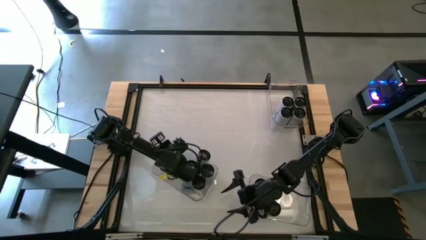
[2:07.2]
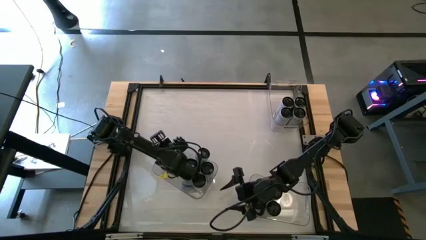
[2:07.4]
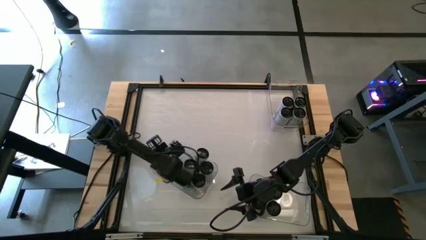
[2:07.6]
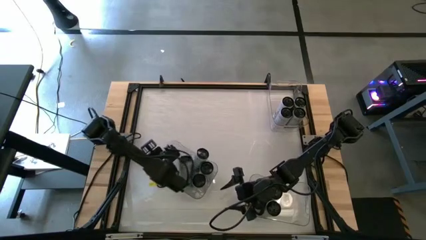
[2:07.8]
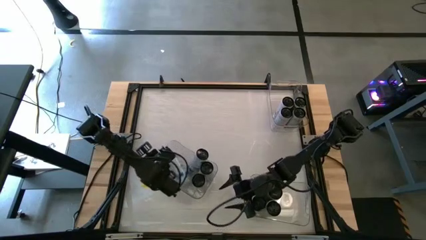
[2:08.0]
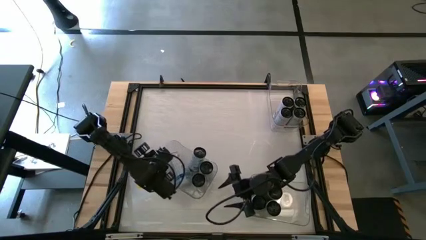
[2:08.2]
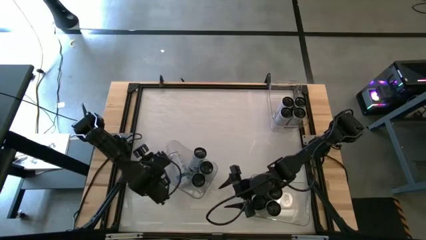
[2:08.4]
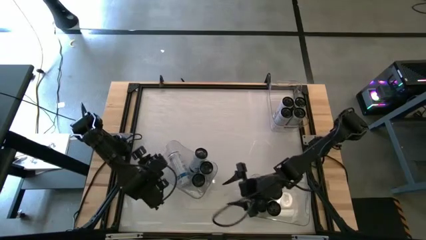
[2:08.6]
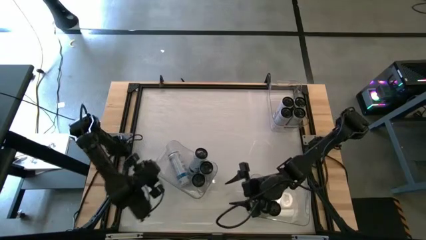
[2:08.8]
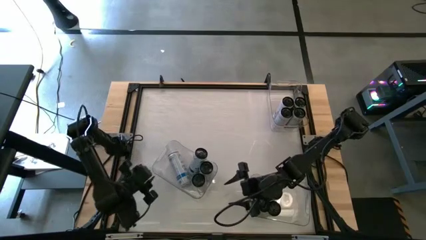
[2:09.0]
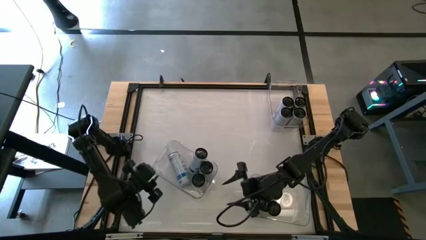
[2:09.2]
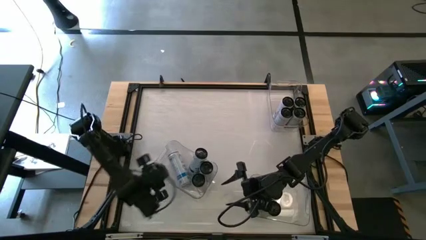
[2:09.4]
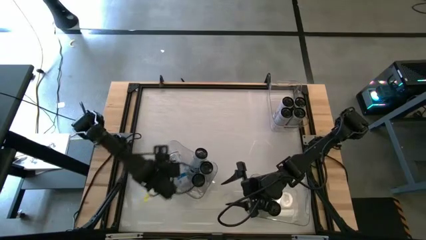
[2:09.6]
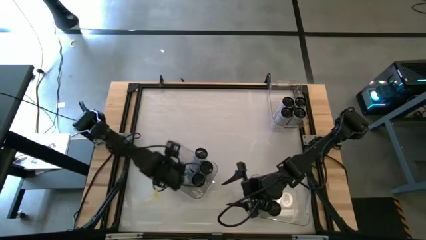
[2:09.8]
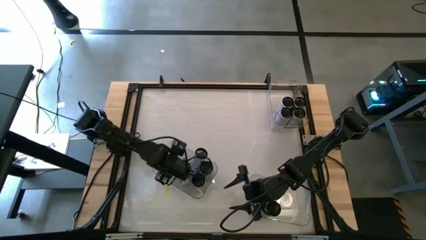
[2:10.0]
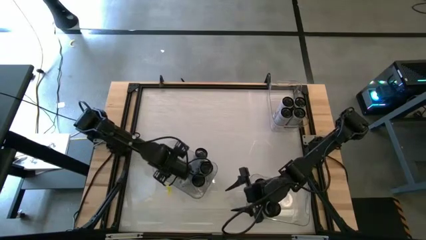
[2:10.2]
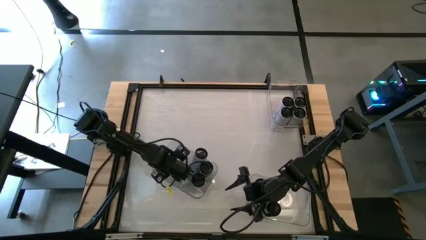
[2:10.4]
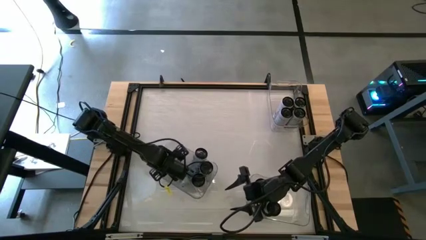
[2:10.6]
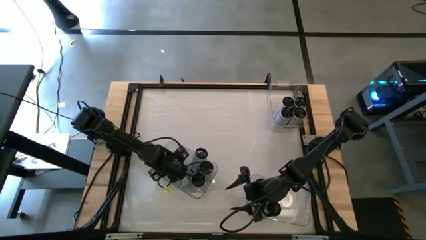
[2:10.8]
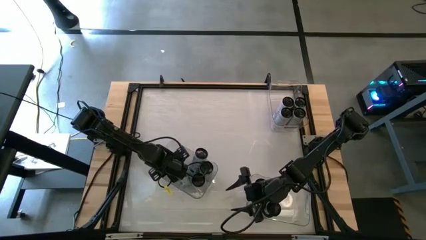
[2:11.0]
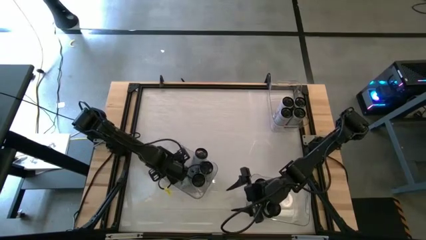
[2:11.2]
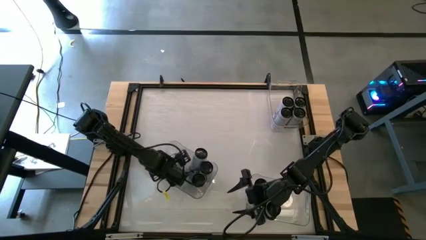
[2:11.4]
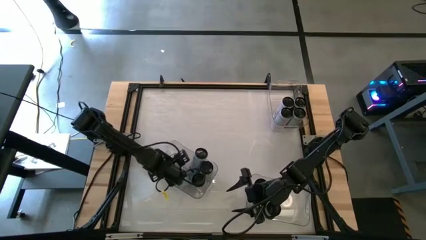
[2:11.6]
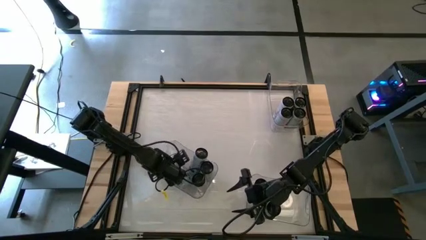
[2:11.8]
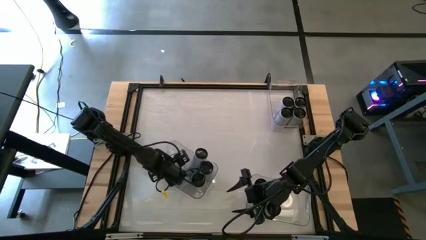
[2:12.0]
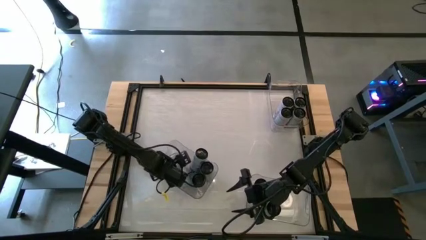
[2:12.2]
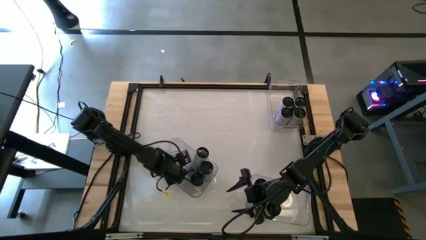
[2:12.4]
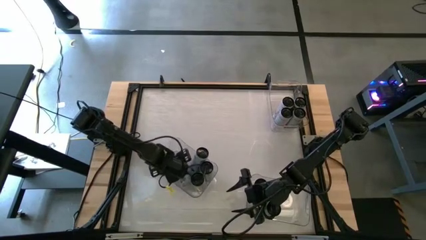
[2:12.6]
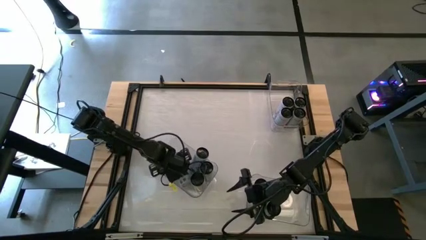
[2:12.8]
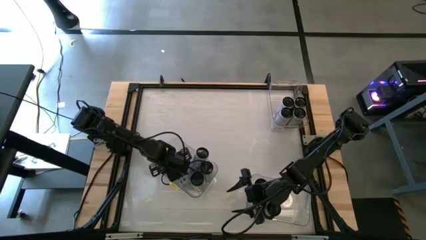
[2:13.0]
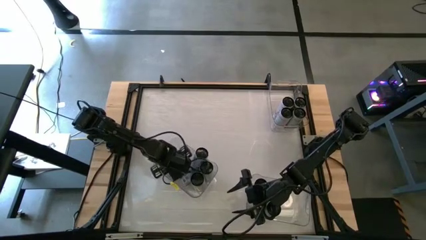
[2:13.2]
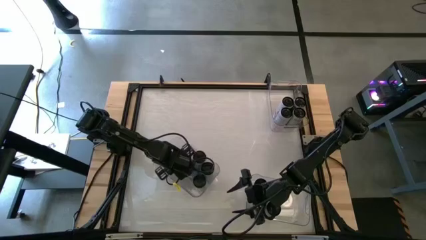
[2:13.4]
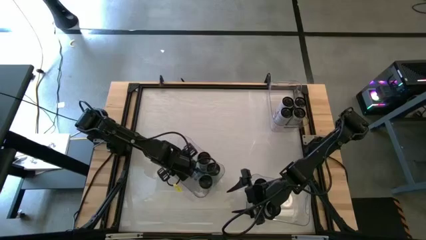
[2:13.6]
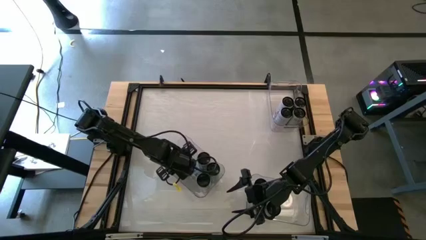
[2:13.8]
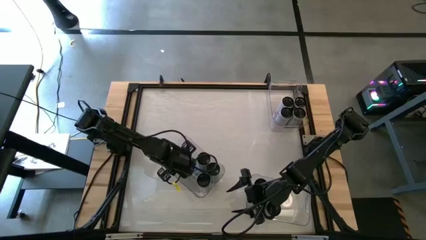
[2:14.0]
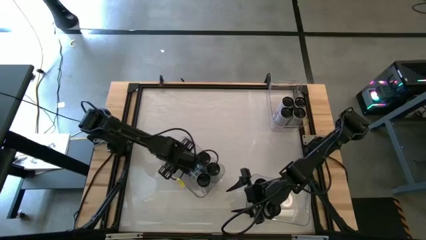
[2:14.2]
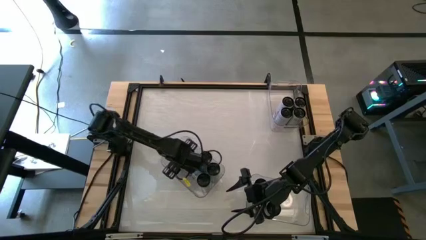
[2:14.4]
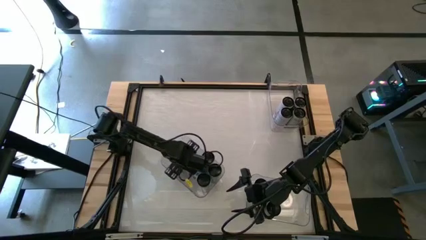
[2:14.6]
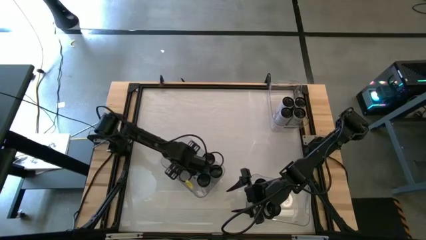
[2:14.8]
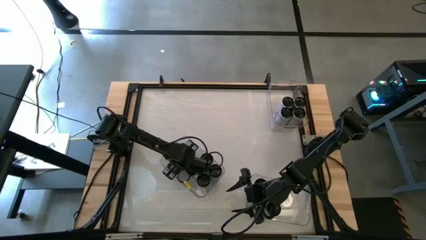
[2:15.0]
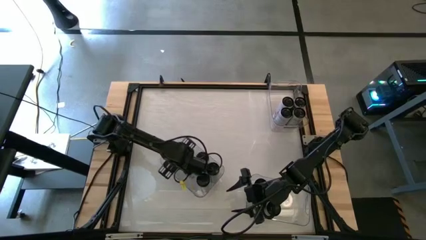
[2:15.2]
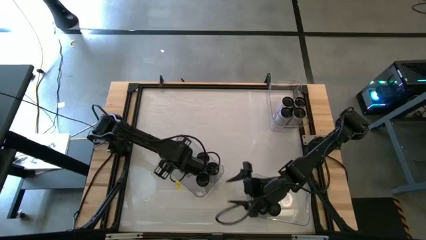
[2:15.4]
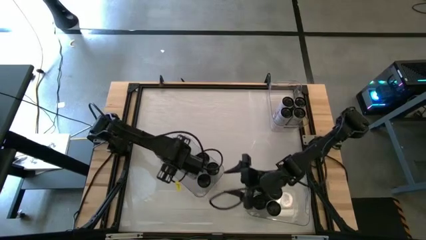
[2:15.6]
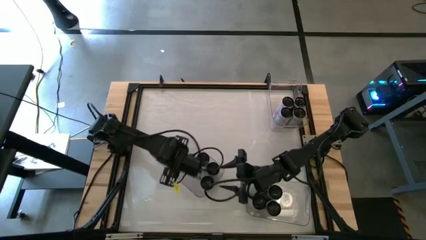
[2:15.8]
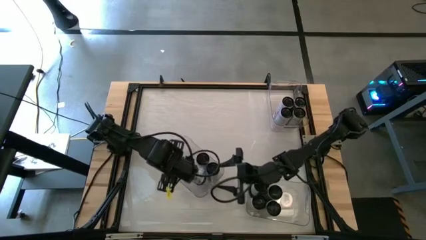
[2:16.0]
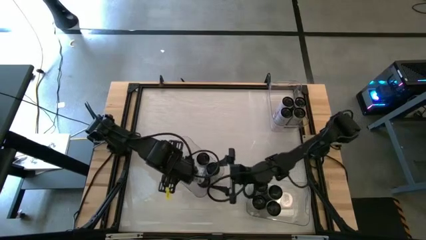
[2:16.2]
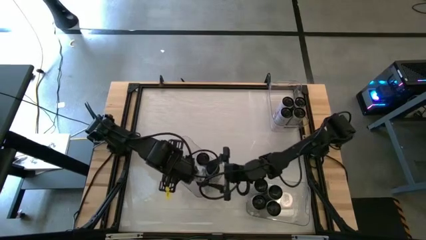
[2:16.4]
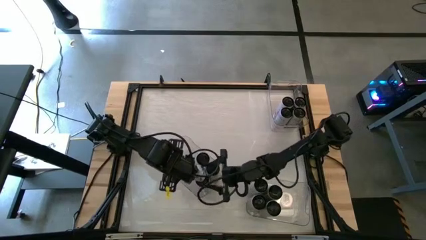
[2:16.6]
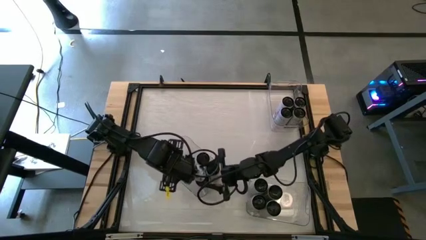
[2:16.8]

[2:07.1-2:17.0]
Task: Sort soda cans
Adjust the white-blue soda can in the bottom left transparent bin
